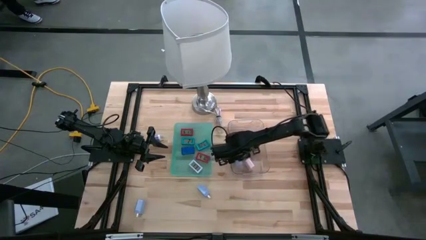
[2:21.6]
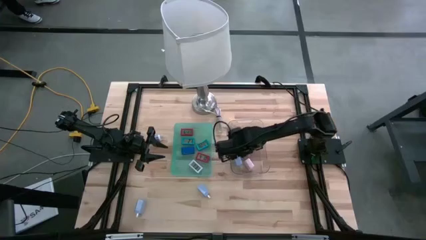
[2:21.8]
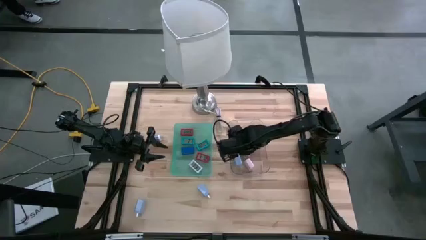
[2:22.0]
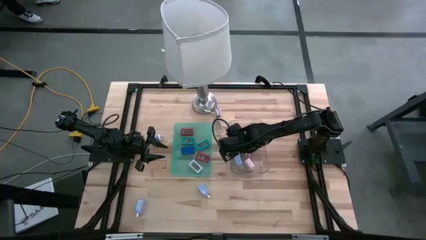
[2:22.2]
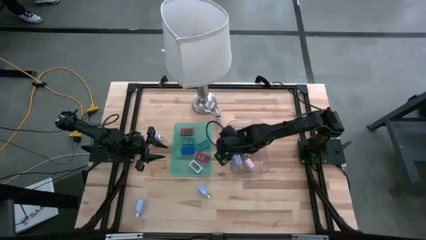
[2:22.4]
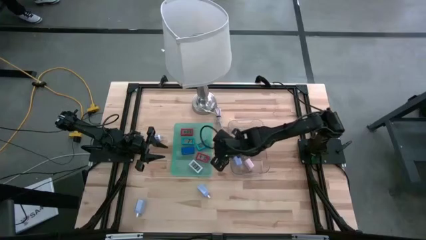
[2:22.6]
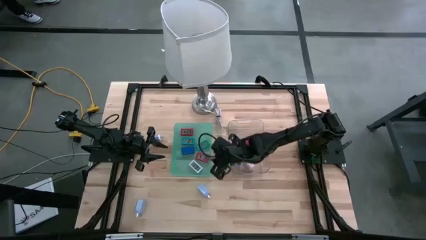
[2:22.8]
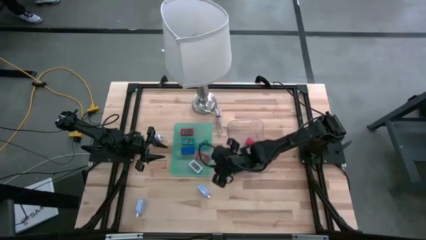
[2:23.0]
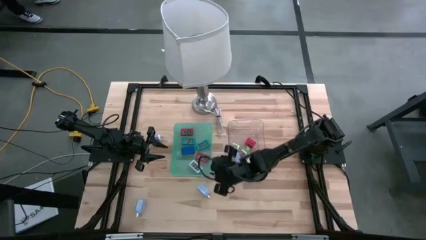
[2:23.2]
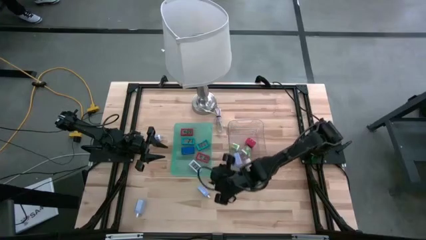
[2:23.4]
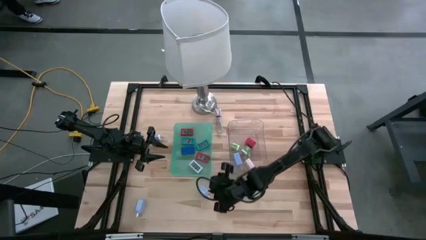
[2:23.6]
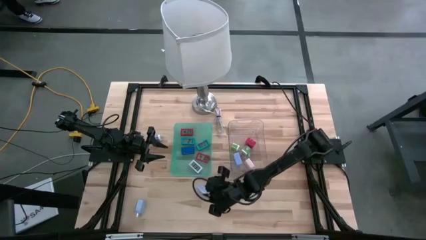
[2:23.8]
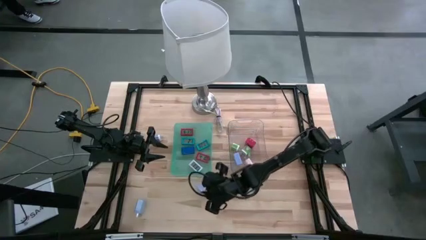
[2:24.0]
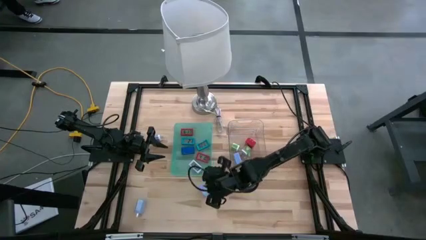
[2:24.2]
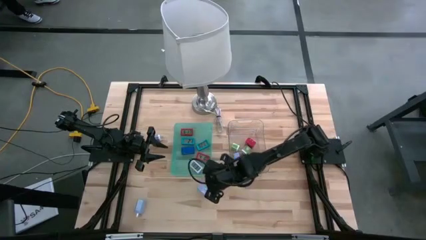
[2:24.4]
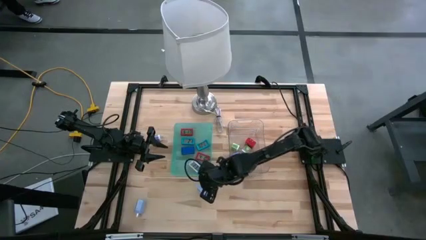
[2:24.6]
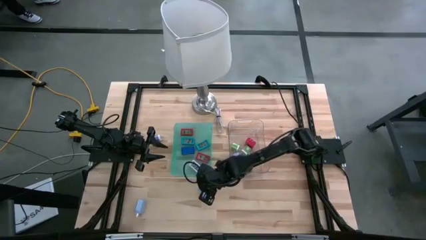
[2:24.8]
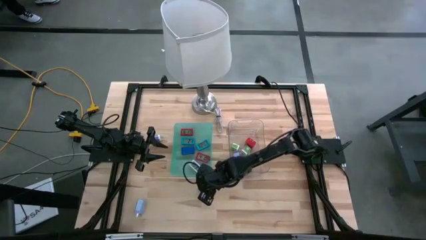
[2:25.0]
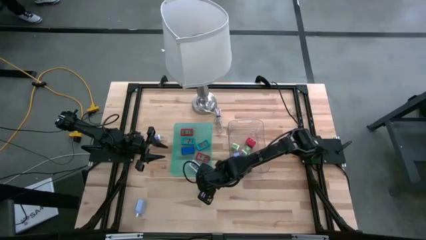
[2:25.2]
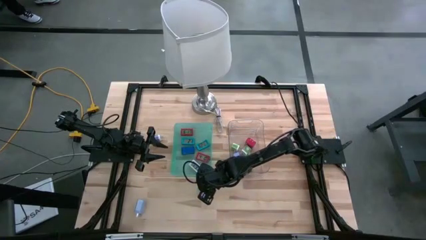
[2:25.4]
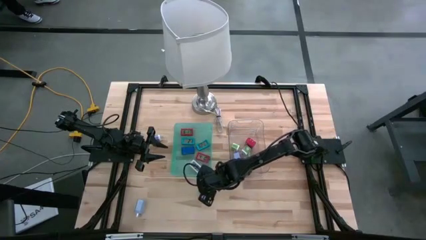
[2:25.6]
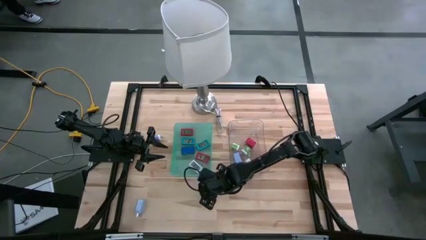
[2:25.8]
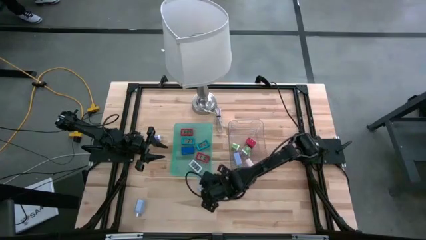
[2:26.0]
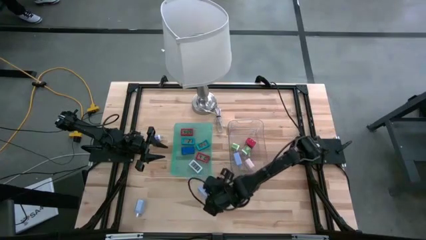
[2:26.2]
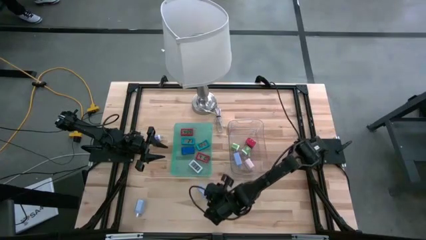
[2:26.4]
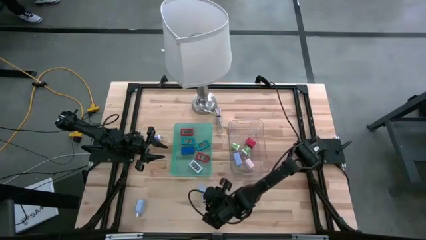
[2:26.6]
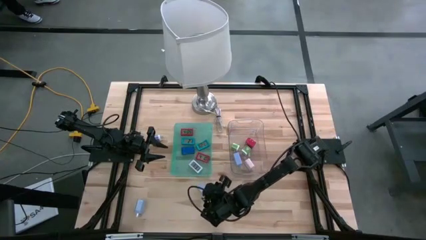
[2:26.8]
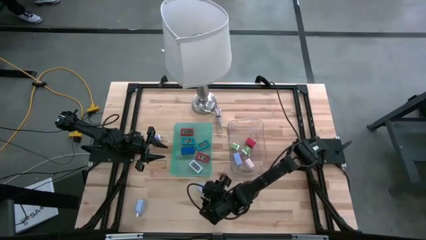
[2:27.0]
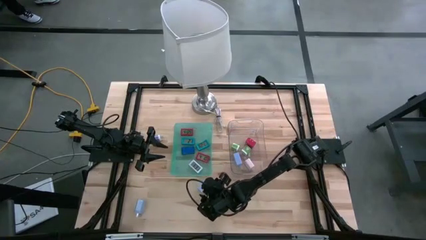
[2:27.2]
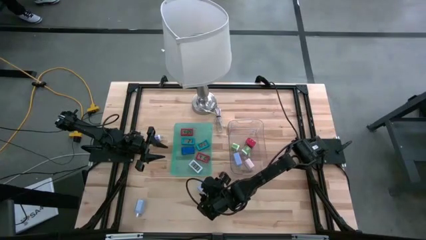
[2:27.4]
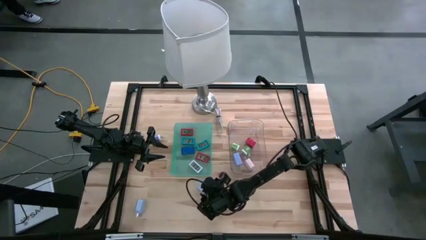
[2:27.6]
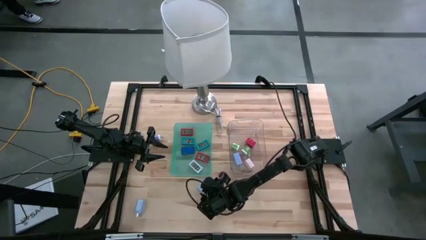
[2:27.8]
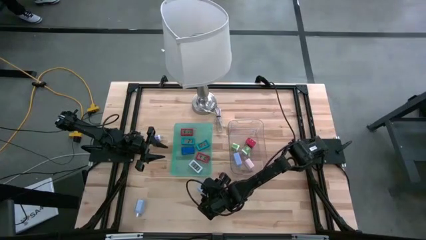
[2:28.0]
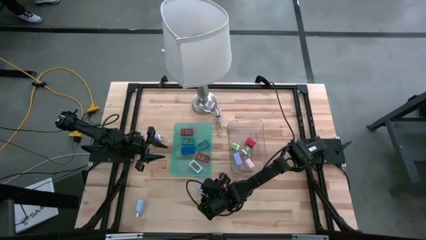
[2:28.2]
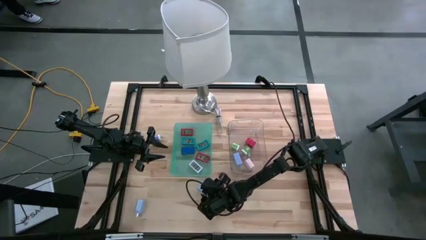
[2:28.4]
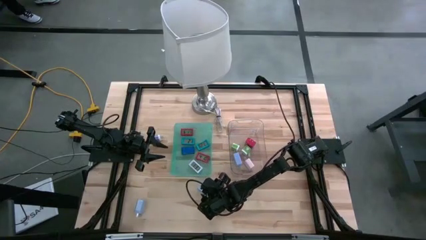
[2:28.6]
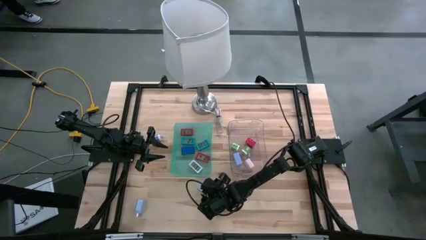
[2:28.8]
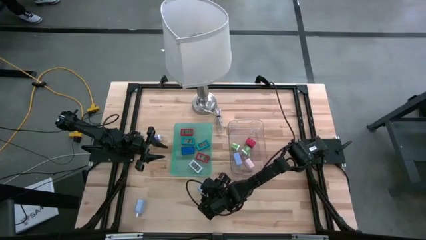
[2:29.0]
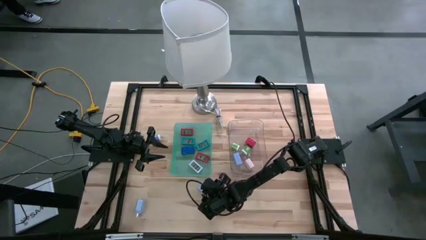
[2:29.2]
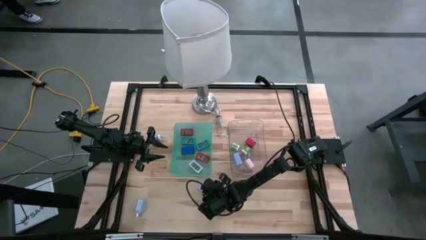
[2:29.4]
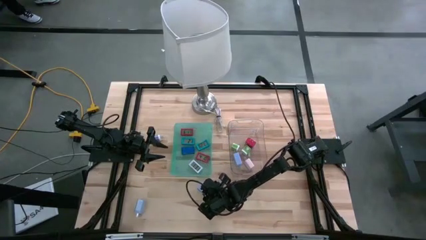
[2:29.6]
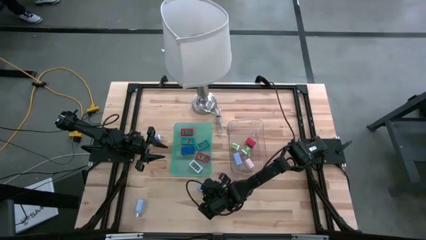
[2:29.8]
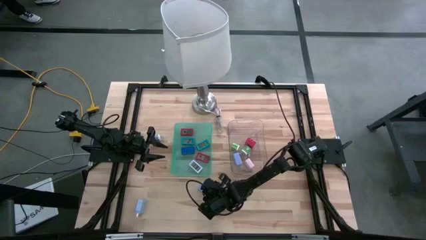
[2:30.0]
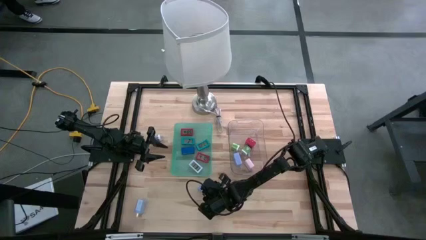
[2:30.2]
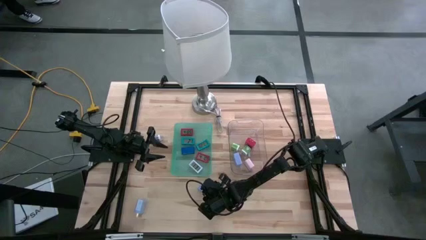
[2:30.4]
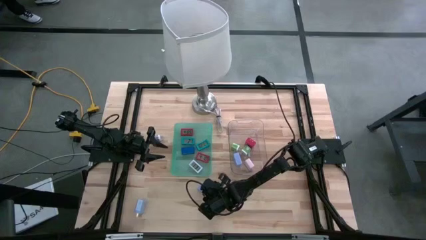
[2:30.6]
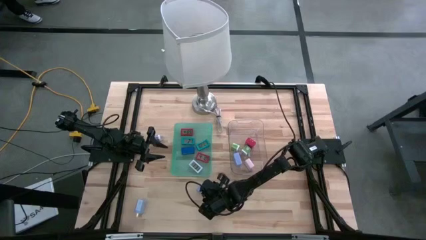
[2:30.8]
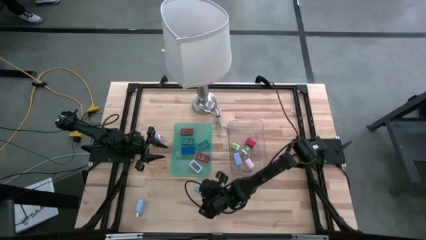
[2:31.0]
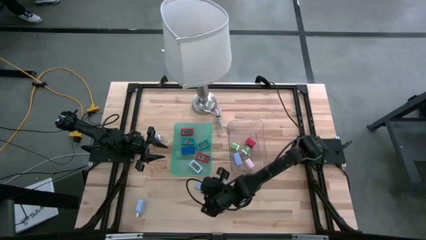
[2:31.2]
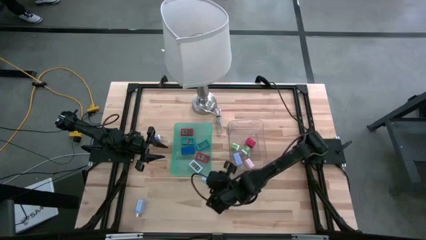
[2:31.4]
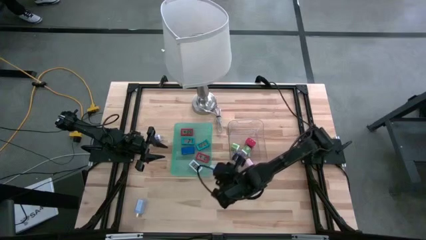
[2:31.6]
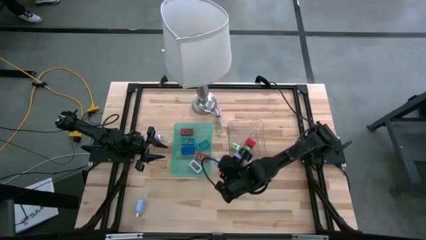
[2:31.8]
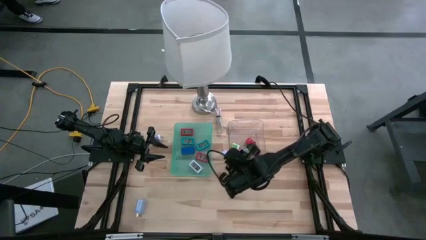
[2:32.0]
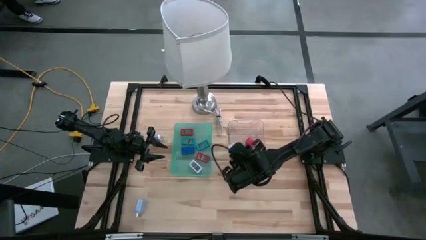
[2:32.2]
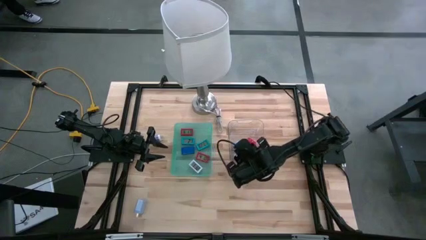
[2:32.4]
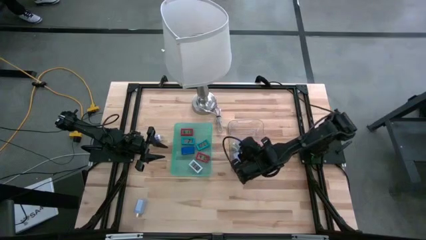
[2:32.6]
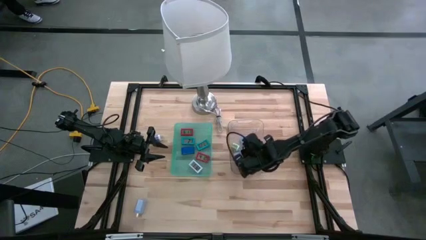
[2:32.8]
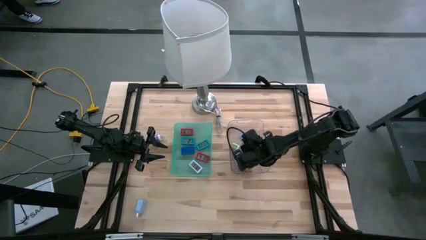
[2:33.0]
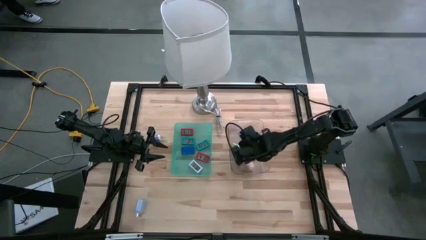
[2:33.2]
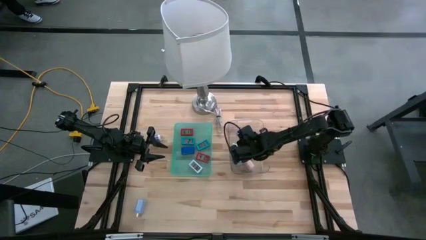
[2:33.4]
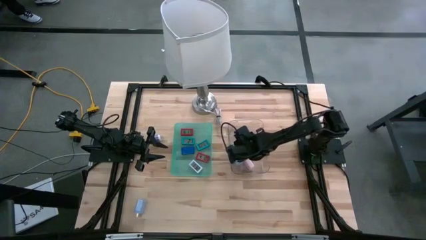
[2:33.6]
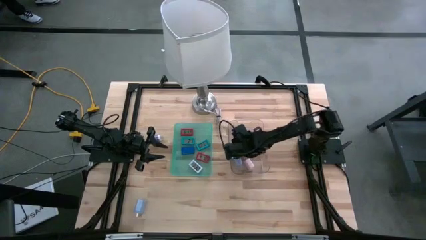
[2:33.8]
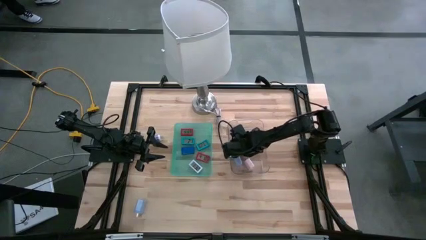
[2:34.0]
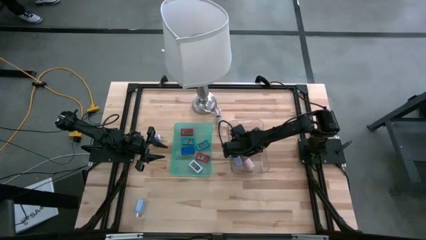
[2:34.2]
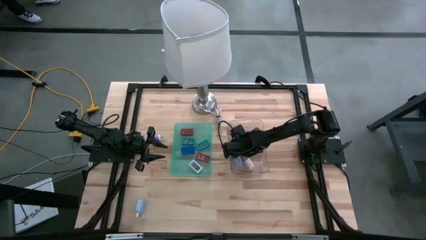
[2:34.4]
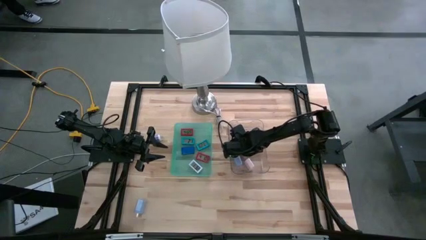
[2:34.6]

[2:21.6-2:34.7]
Task: Pick & Place Office items
Put the right violet charger adapter into the transparent bin

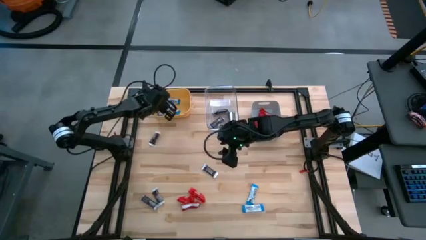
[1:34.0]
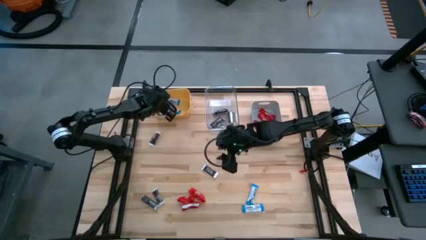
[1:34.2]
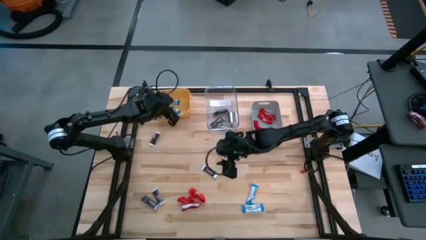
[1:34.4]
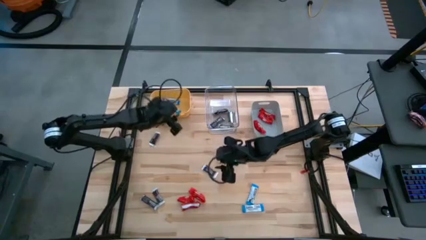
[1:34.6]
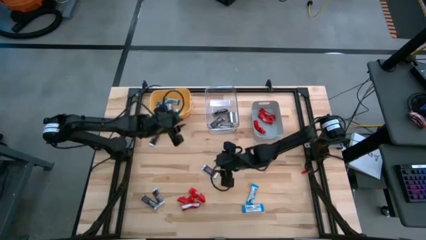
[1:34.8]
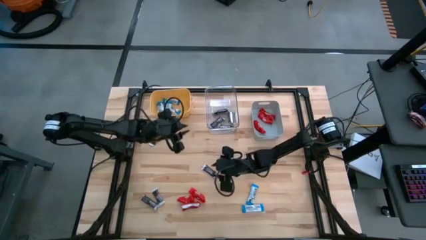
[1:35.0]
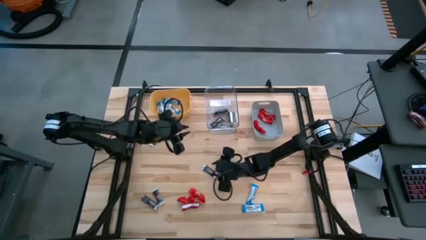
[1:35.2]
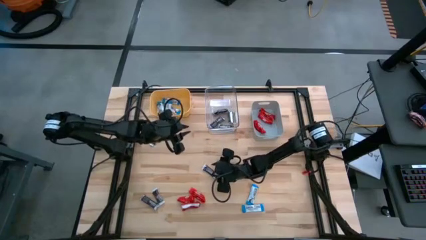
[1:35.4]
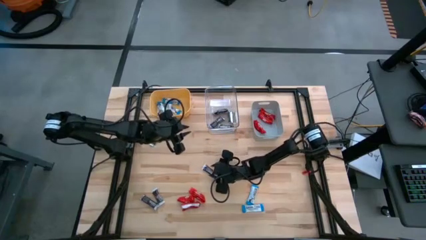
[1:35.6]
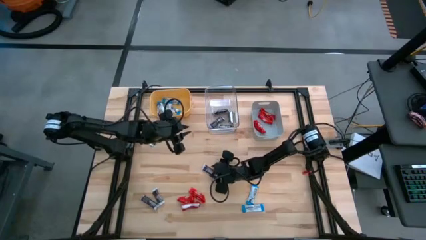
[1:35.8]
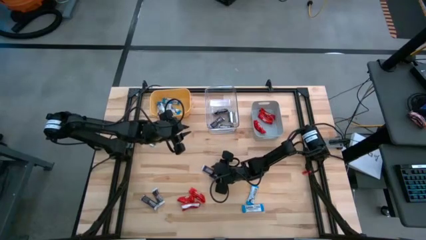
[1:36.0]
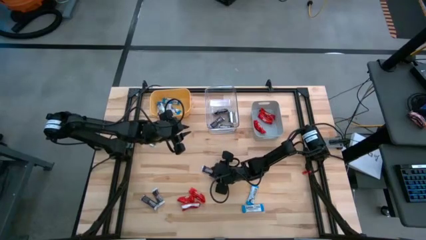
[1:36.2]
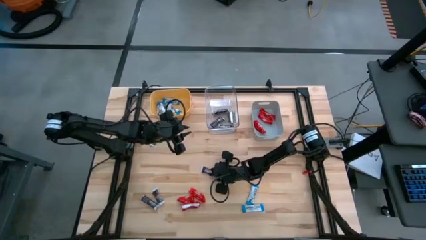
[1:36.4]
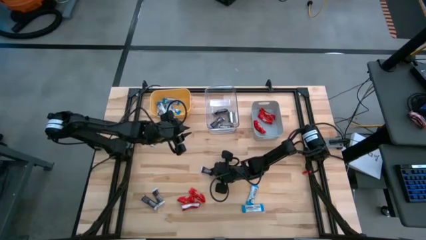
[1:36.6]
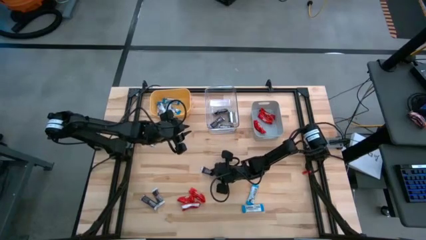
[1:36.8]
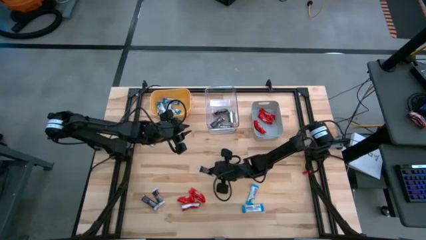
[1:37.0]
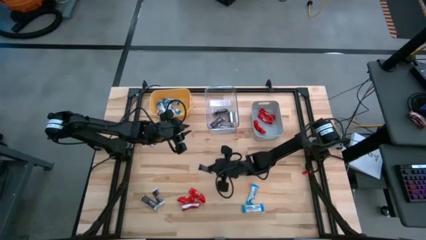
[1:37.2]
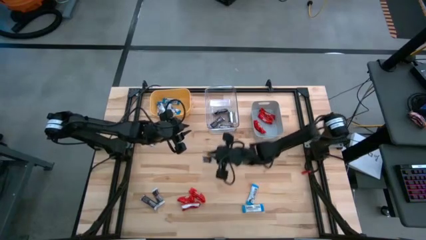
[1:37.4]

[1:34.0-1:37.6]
Task: Sort candy
Put the brown chocolate into the transparent bin
